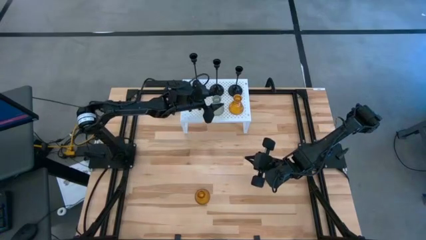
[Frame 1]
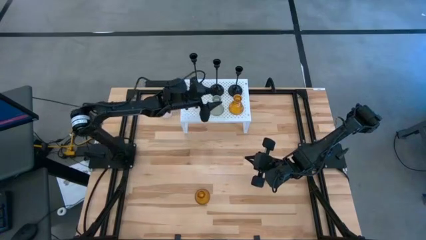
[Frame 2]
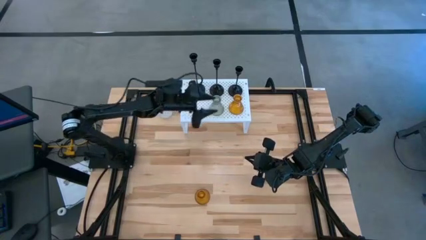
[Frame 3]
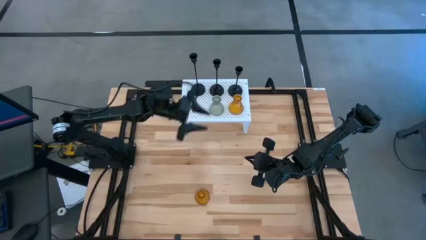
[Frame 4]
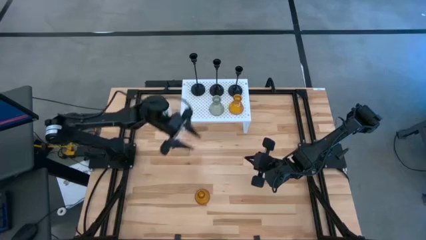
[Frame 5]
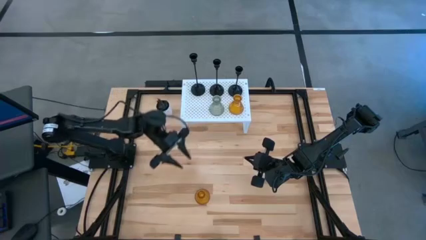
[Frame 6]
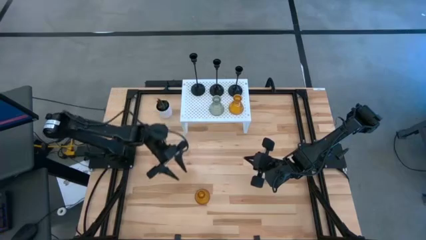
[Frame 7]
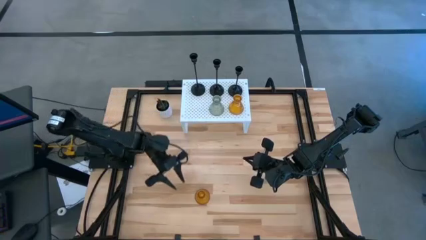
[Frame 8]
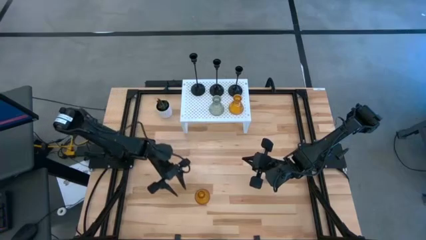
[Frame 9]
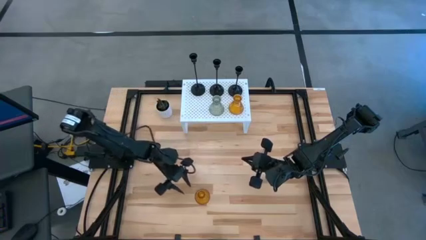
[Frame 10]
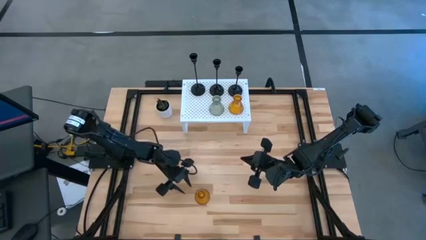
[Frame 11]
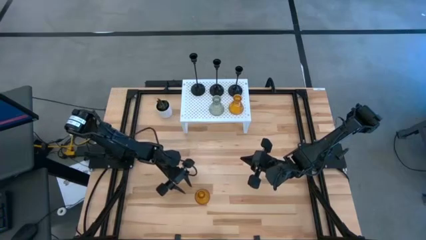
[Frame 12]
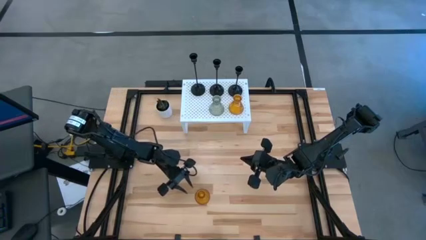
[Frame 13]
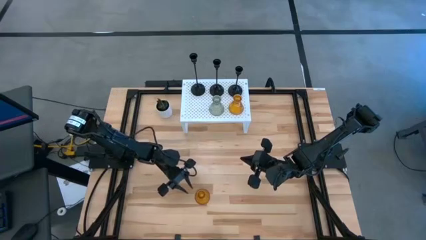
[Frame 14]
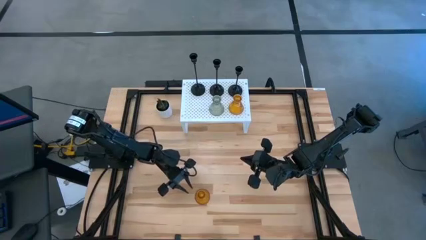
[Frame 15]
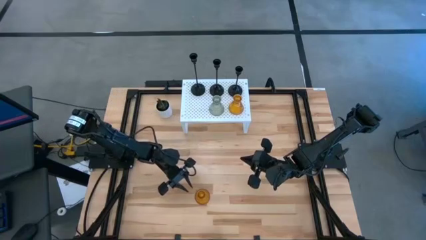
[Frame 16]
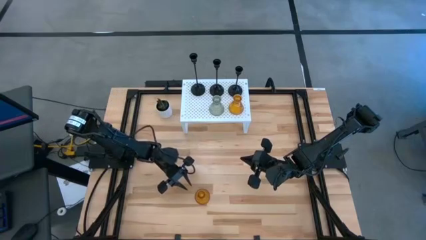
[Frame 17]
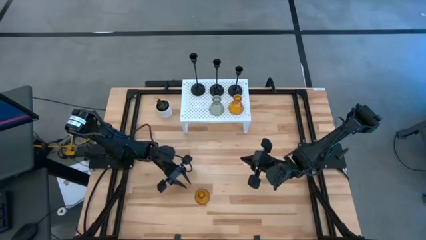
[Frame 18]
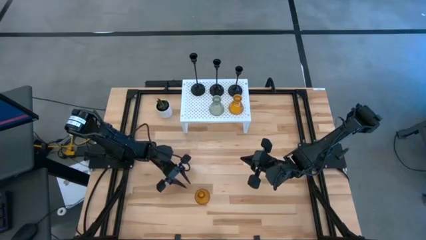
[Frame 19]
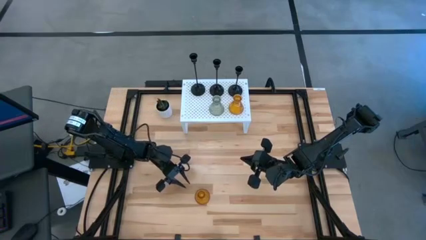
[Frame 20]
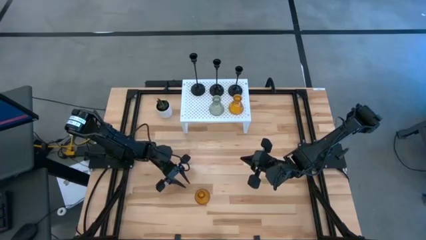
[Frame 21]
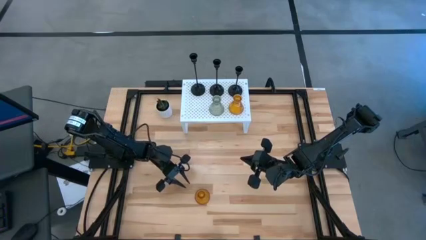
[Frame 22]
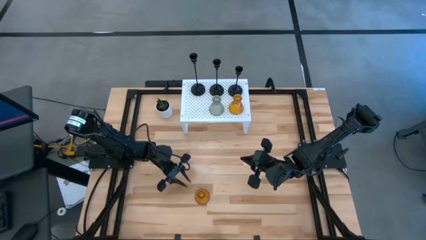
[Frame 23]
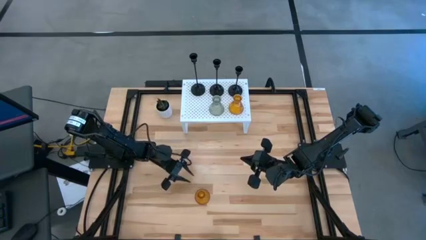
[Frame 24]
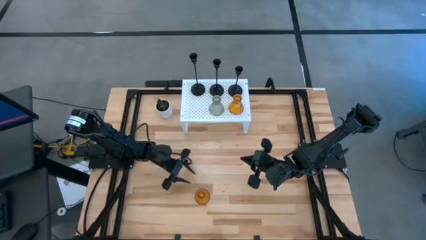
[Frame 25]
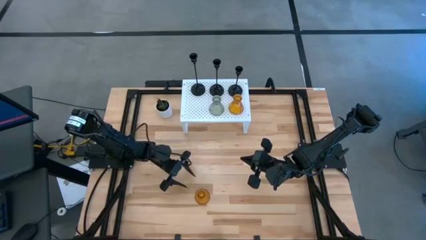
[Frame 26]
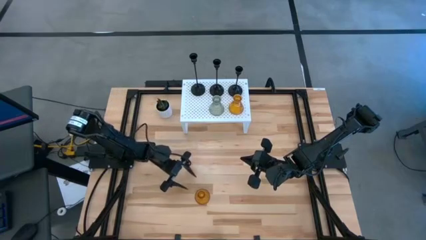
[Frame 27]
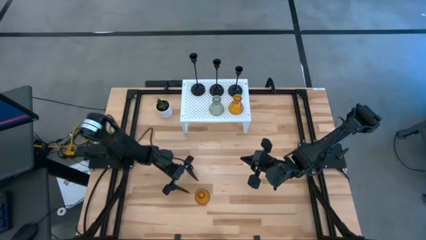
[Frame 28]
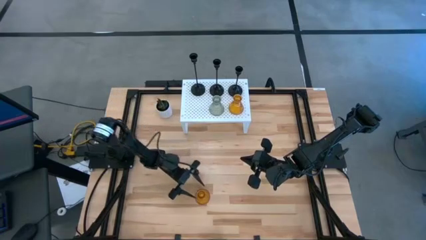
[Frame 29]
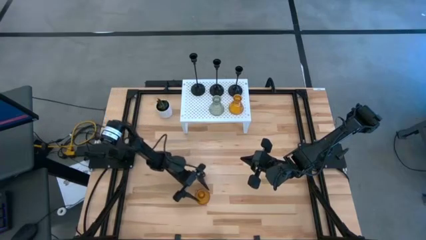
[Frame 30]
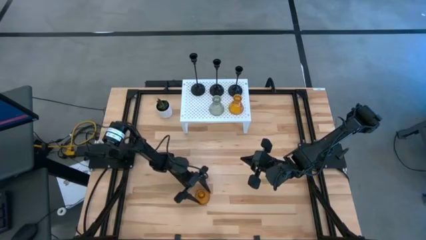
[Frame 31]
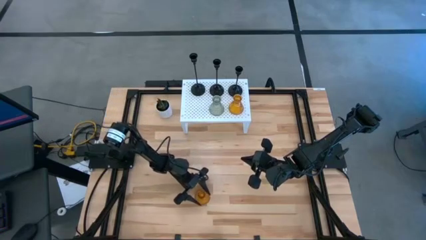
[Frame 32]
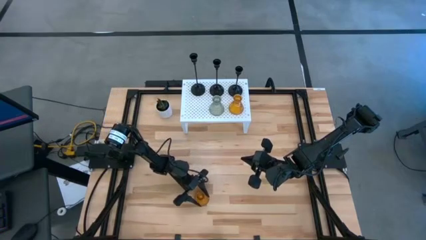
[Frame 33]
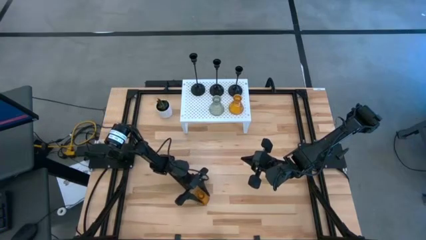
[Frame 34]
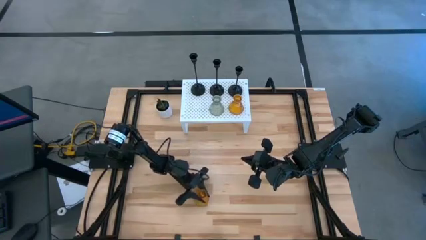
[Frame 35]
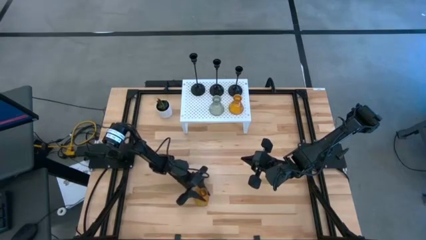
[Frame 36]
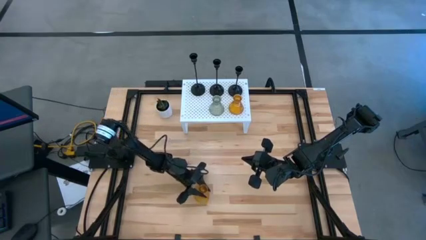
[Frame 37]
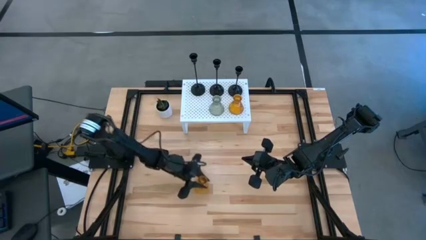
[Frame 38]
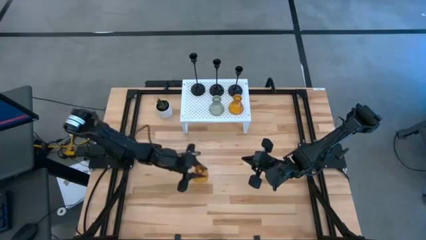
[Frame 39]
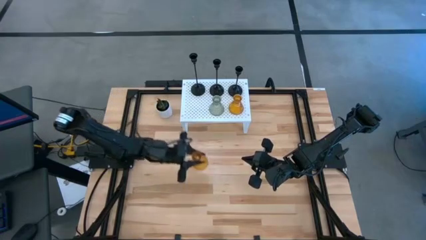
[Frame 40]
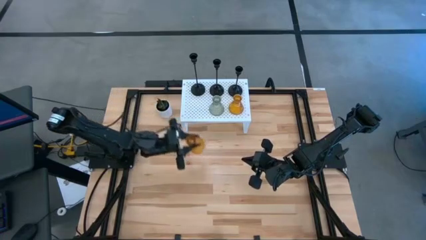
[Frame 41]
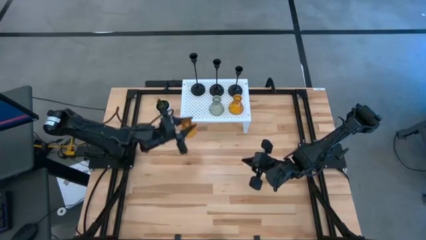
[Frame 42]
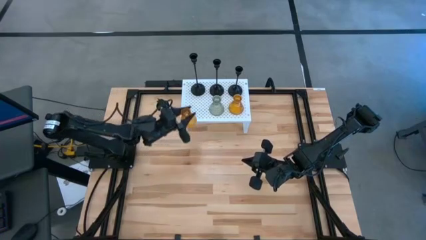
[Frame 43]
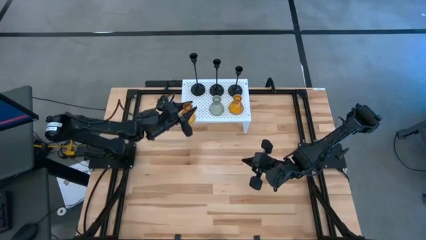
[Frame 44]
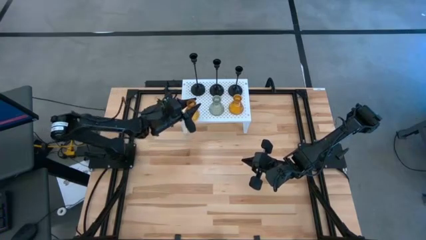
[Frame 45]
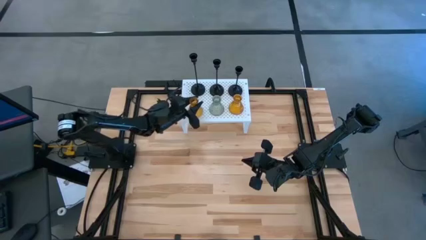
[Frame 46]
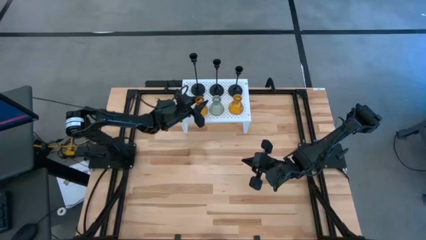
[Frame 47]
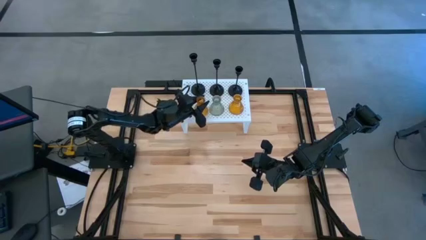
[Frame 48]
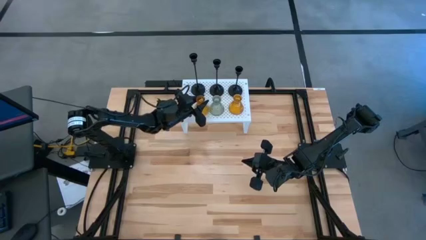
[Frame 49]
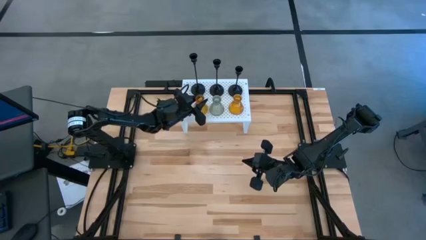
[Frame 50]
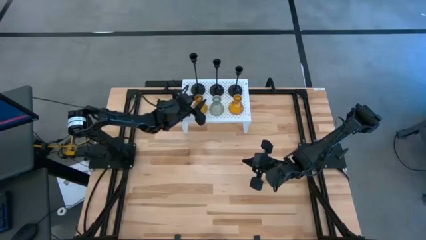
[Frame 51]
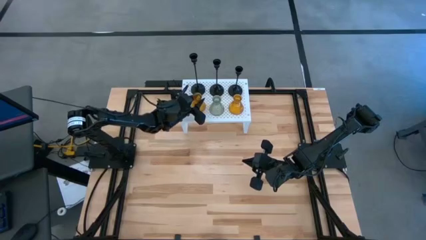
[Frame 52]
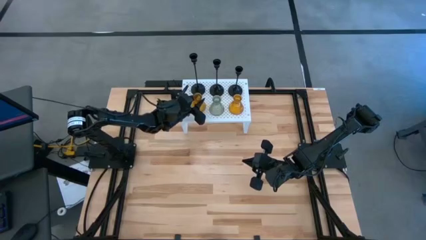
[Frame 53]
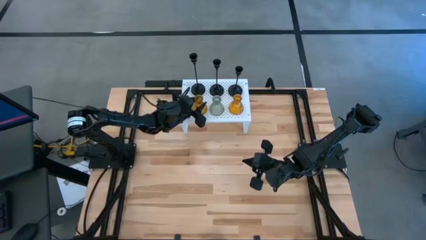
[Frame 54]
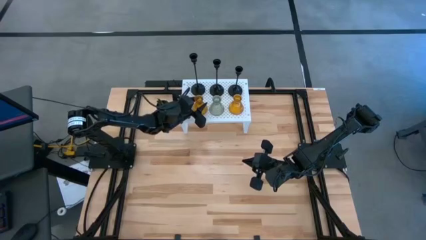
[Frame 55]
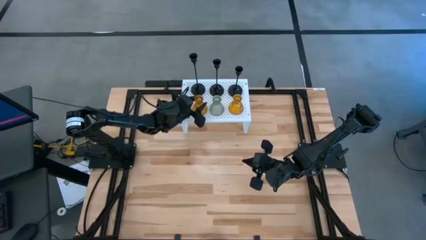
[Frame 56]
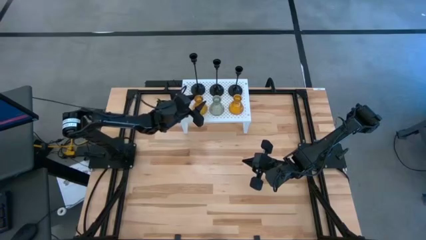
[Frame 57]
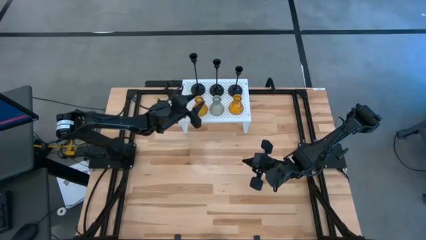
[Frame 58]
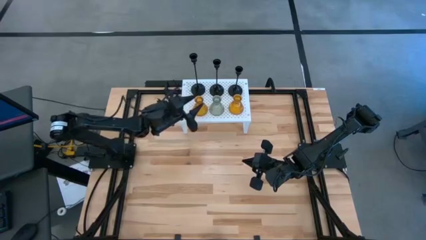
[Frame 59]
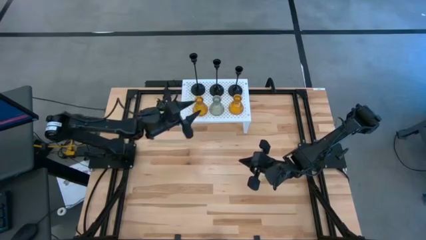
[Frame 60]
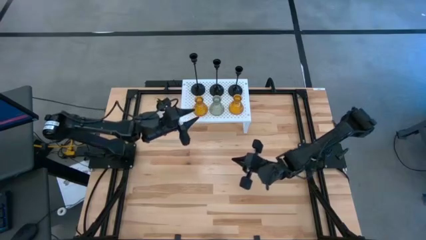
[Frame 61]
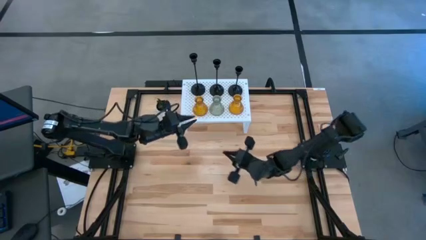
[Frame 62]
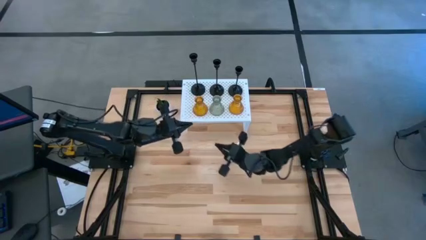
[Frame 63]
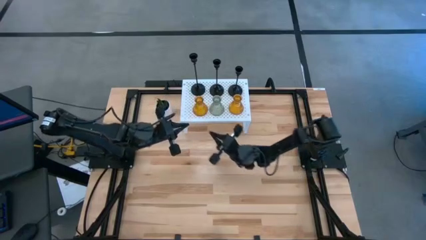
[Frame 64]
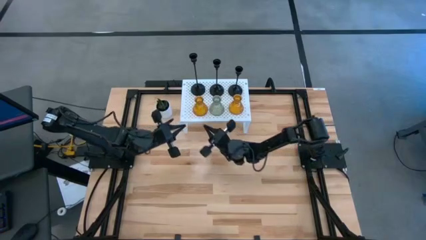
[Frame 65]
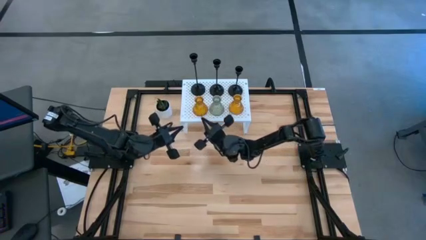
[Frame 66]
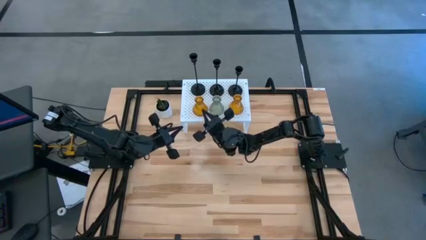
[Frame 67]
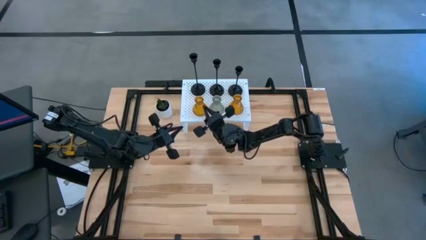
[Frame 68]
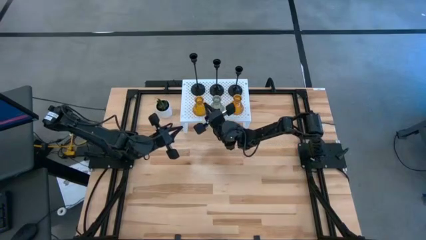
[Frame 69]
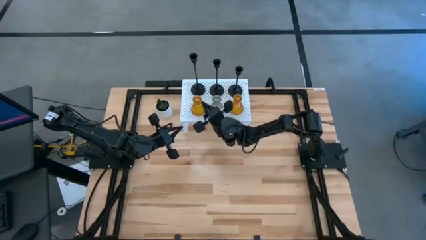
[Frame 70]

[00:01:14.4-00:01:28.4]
Task: Pick & Place candle stick holders
Put the yellow glass candle holder on the shelf aligned with the other green and yellow glass candle holders
